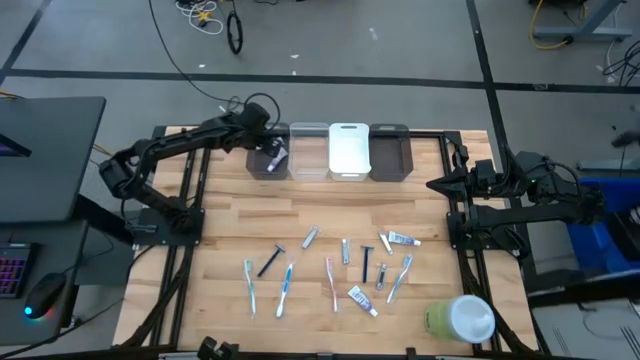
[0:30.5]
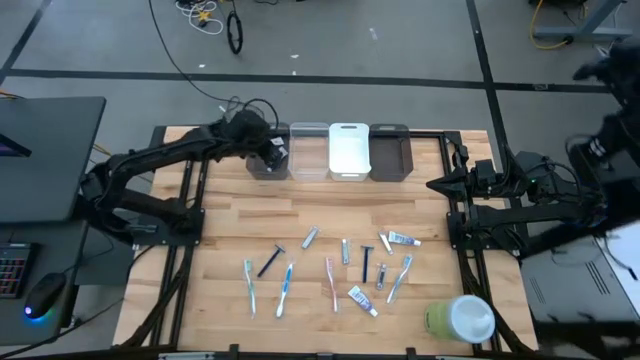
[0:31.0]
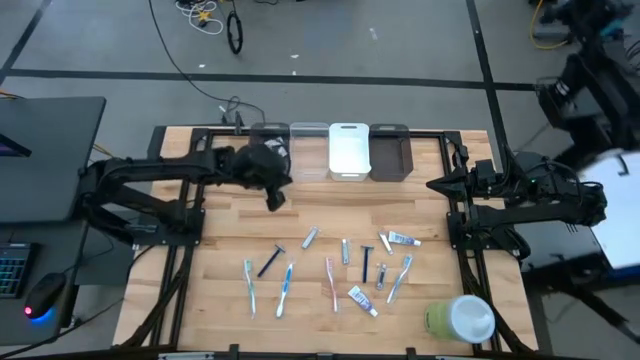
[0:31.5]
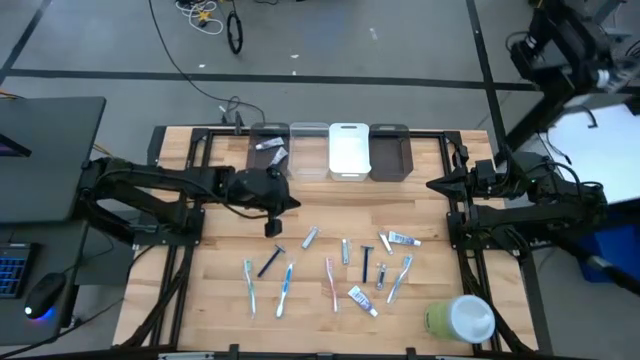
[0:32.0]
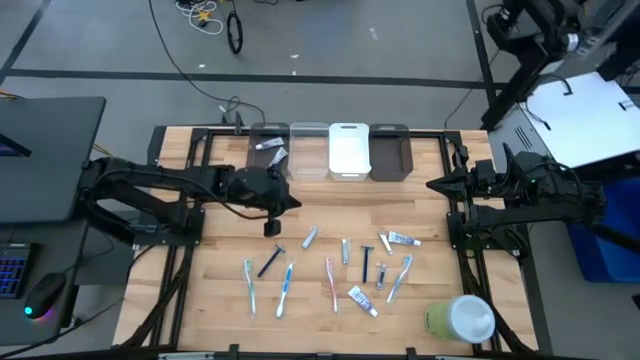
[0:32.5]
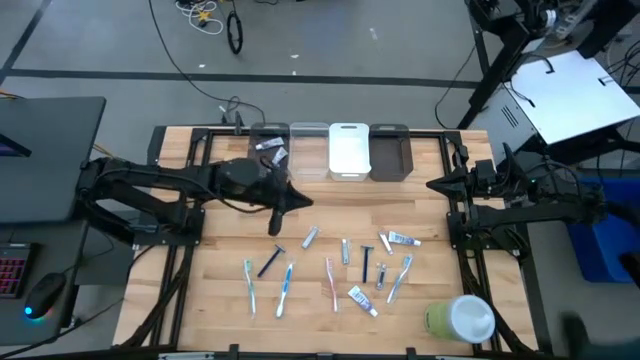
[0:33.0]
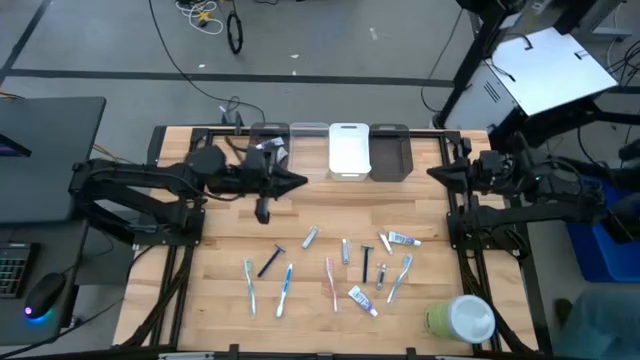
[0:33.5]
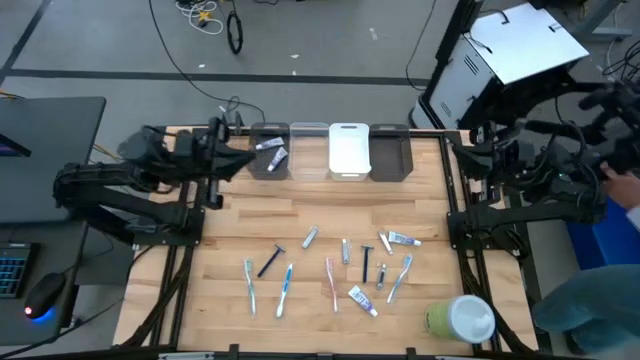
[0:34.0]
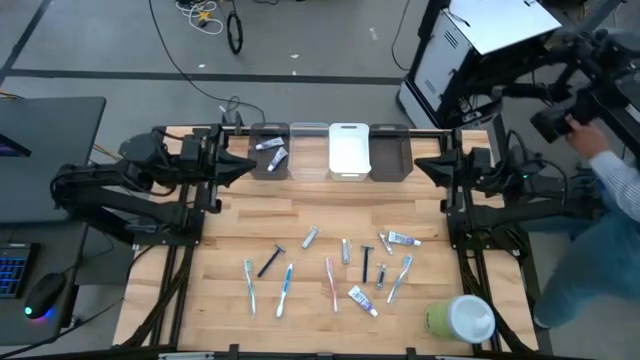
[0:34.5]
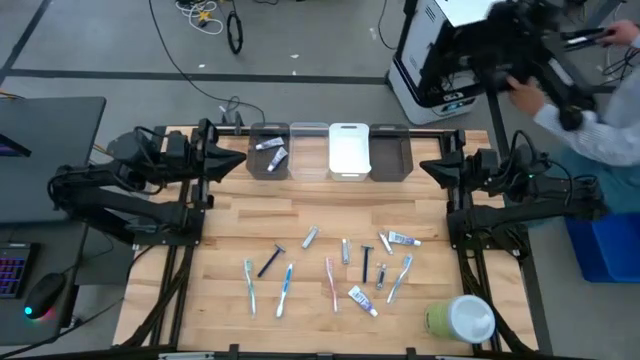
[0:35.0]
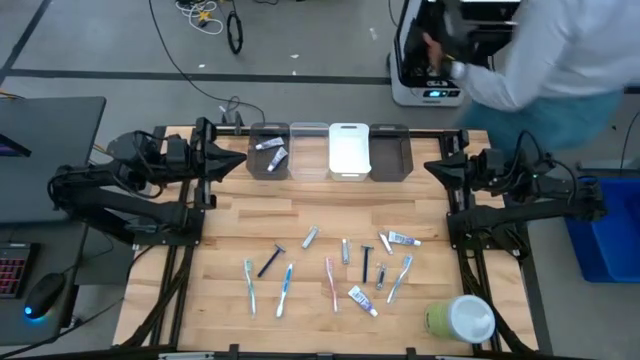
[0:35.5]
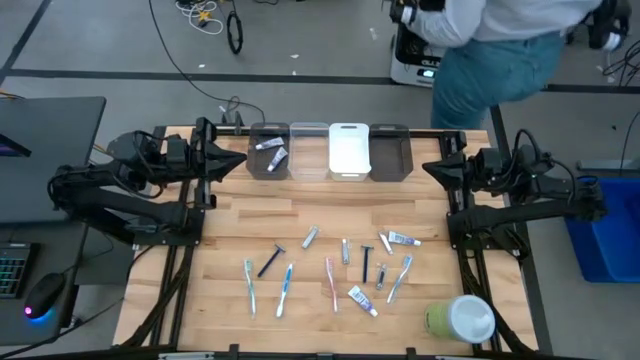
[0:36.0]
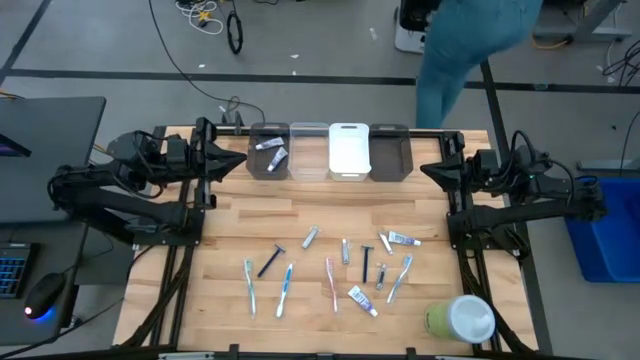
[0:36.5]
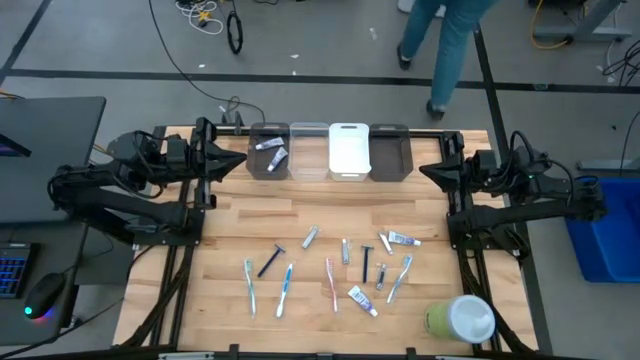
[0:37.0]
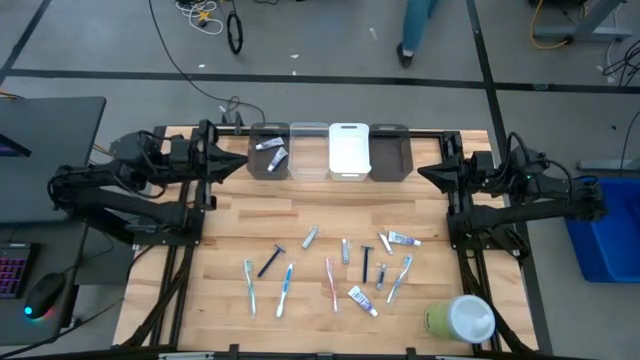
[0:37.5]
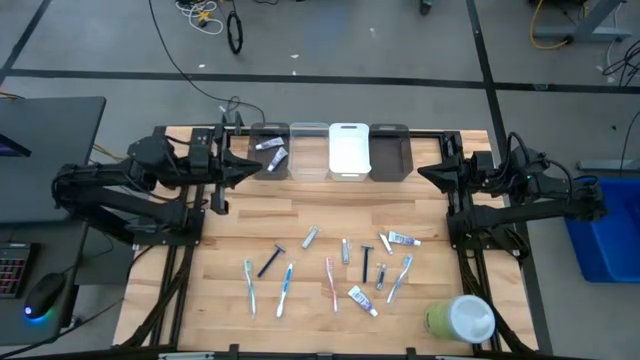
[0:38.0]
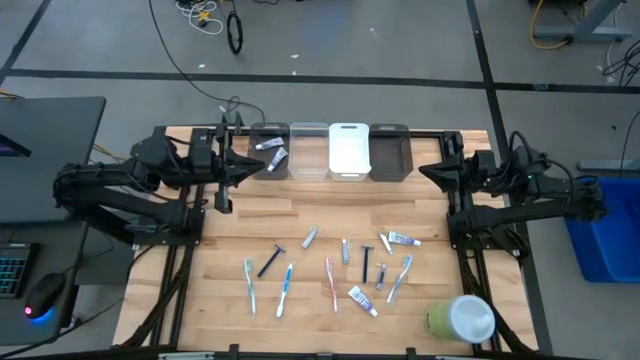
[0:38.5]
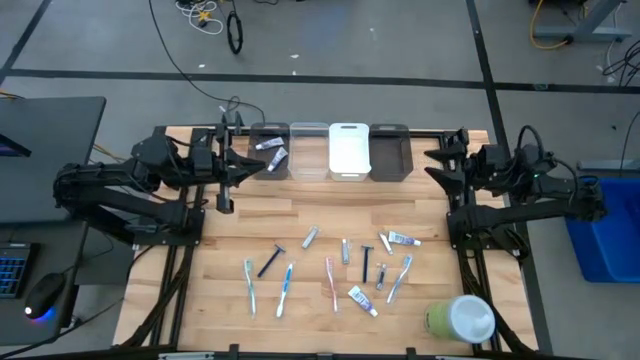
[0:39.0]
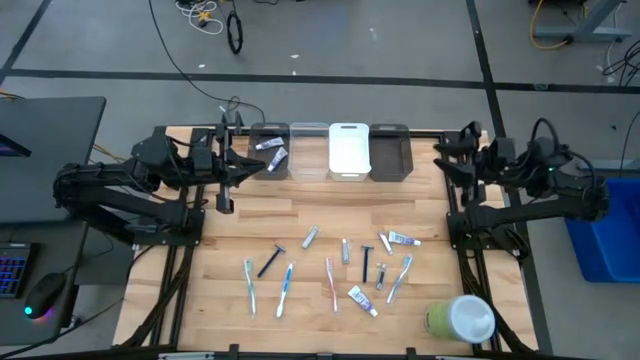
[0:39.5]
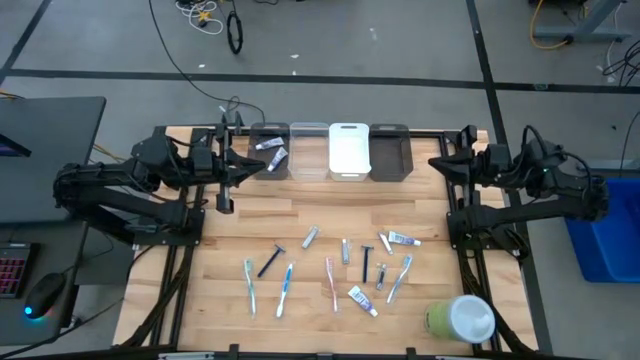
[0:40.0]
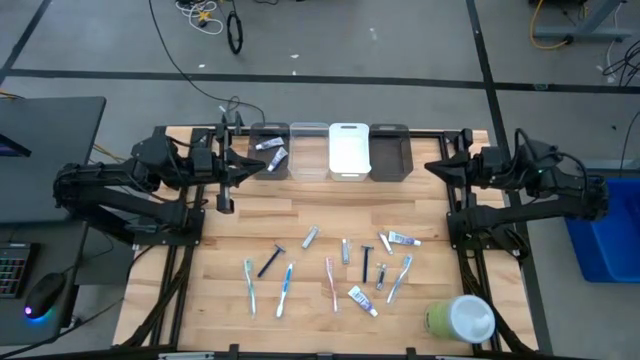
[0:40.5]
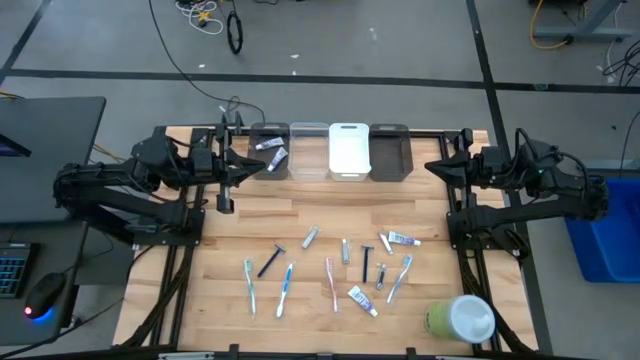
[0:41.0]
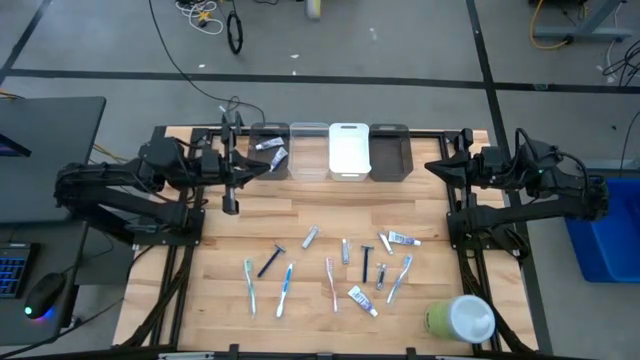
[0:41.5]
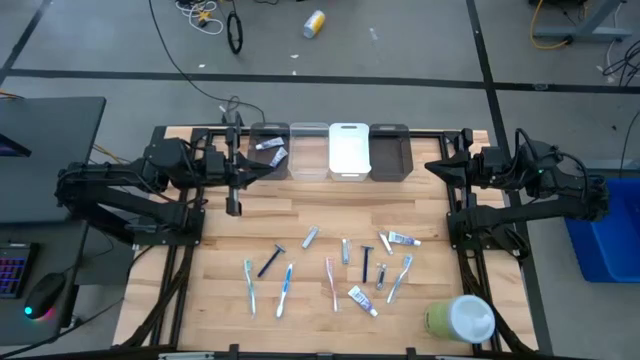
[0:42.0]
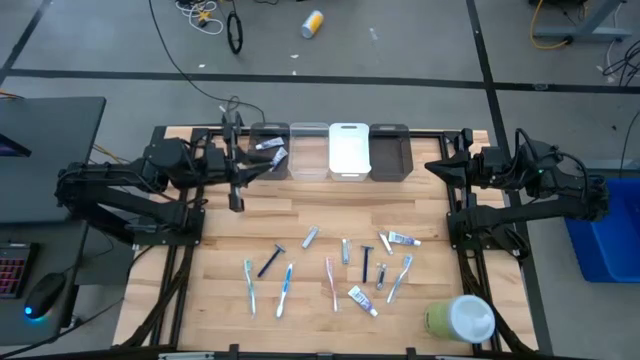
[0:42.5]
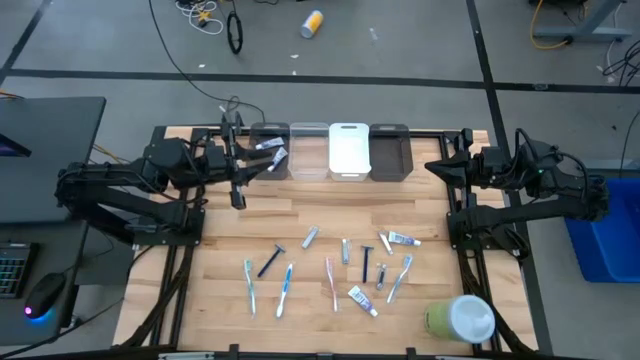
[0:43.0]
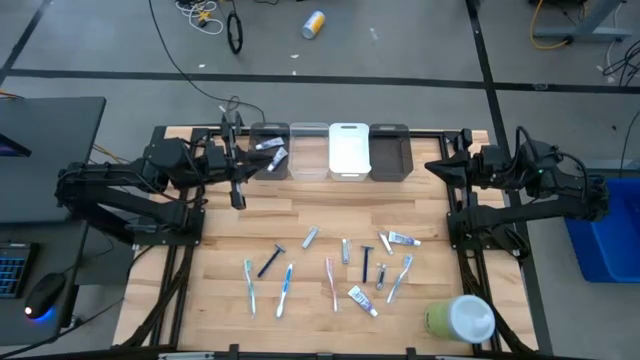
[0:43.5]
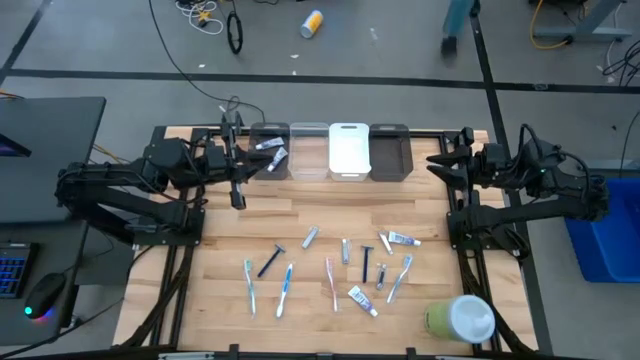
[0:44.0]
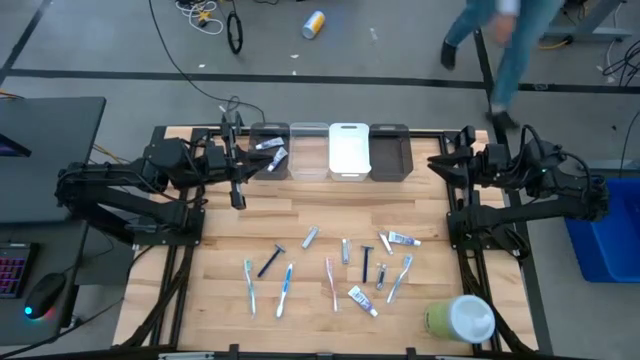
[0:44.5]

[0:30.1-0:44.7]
Task: Pick & Place Travel size toiletries
Put the green toothbrush into the transparent bin
